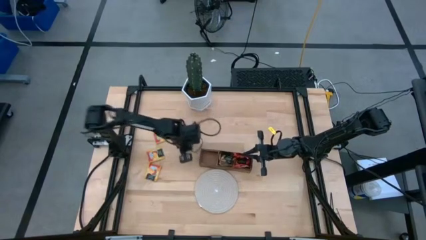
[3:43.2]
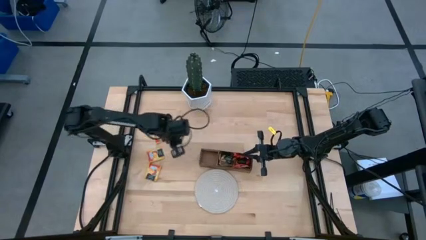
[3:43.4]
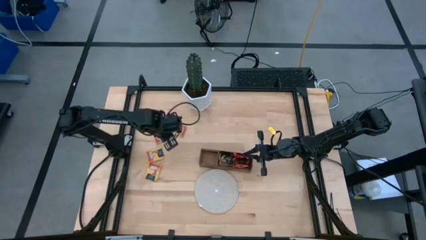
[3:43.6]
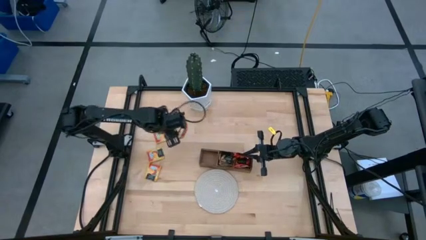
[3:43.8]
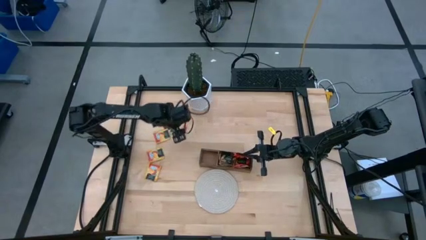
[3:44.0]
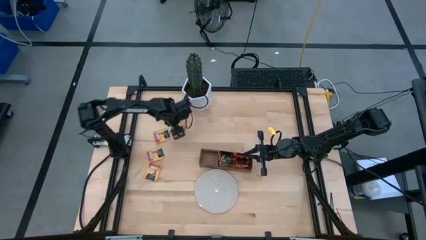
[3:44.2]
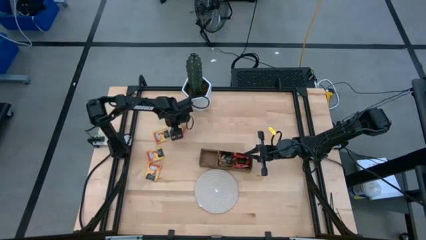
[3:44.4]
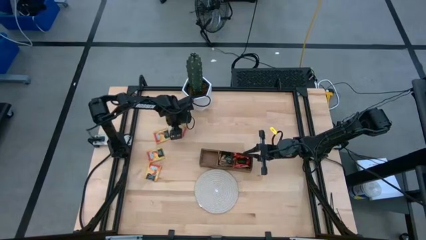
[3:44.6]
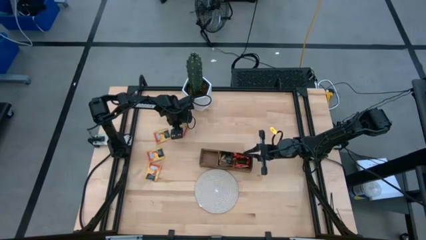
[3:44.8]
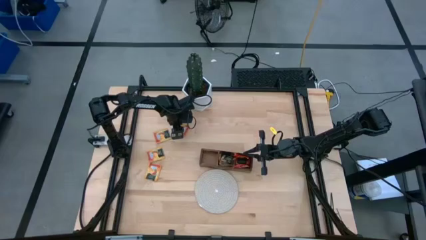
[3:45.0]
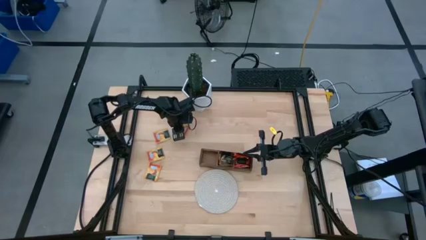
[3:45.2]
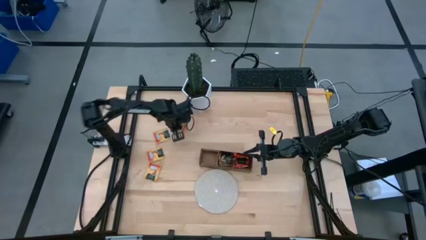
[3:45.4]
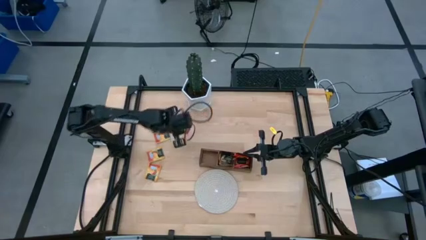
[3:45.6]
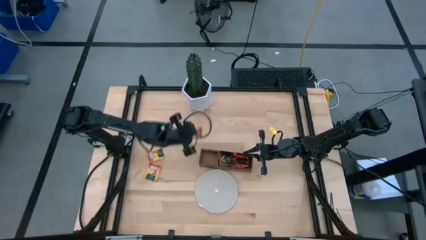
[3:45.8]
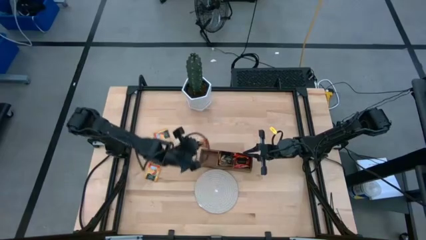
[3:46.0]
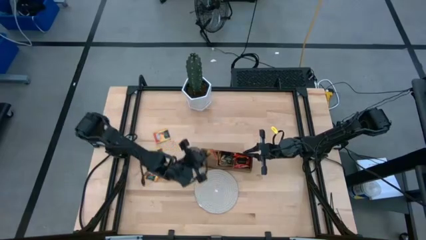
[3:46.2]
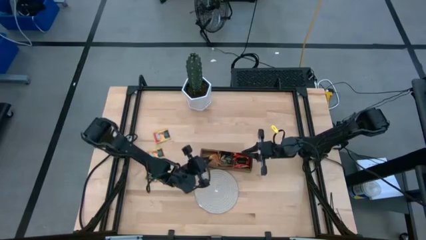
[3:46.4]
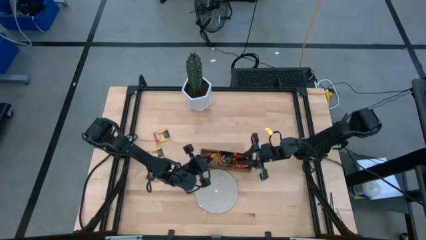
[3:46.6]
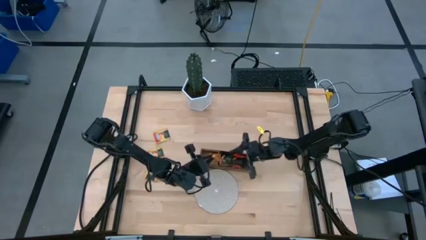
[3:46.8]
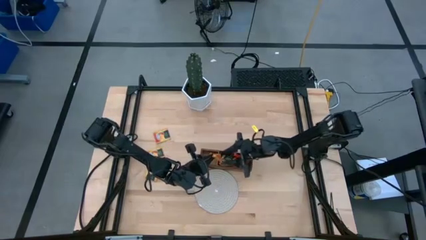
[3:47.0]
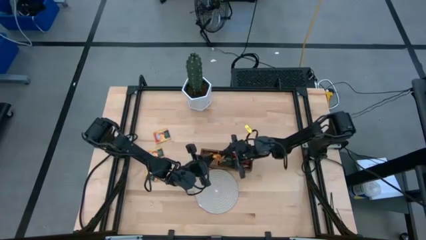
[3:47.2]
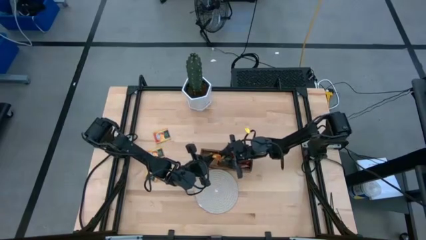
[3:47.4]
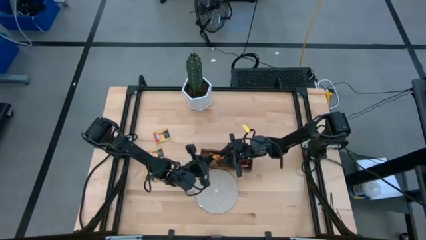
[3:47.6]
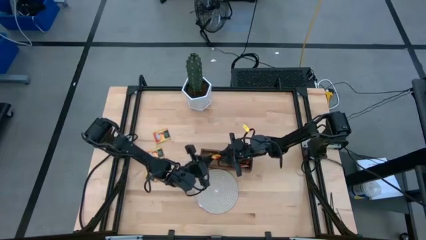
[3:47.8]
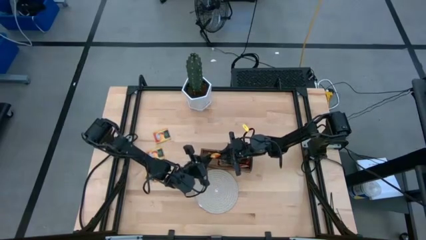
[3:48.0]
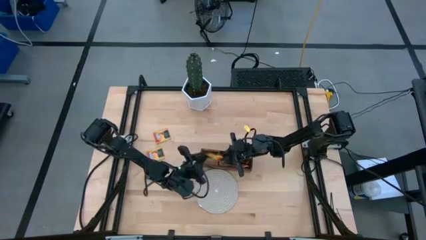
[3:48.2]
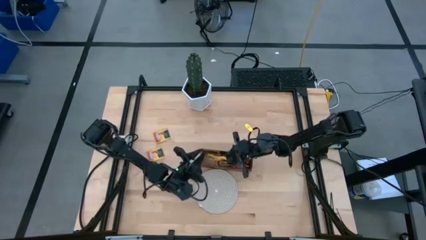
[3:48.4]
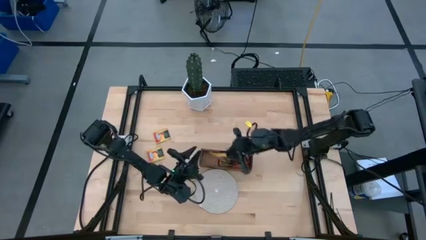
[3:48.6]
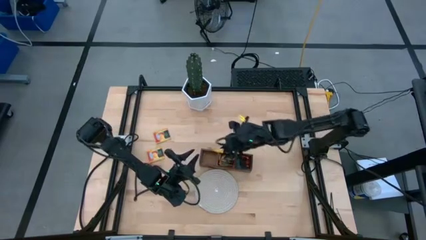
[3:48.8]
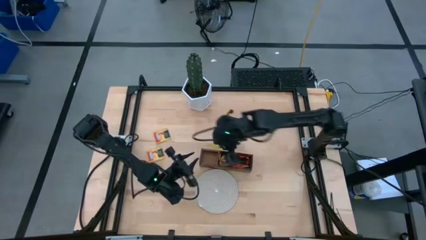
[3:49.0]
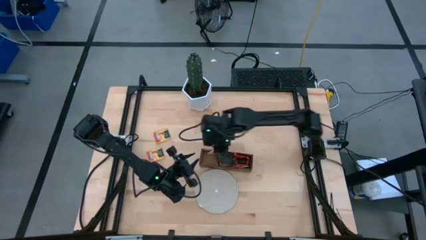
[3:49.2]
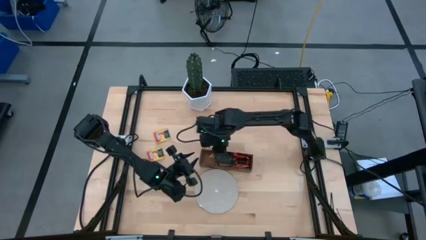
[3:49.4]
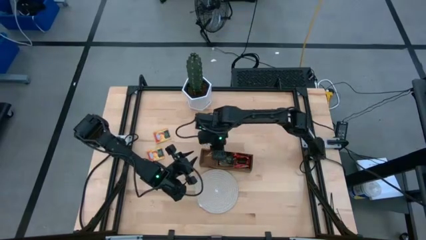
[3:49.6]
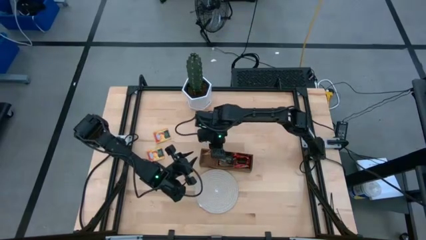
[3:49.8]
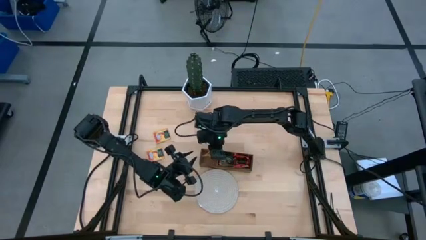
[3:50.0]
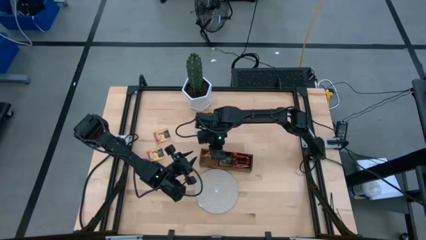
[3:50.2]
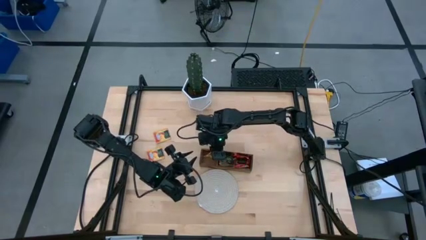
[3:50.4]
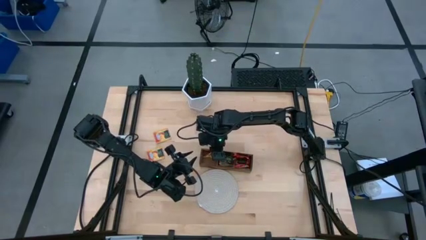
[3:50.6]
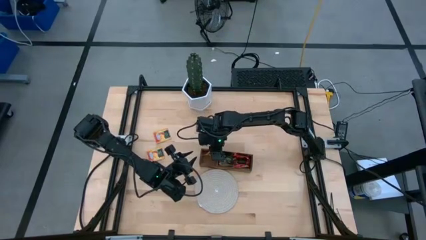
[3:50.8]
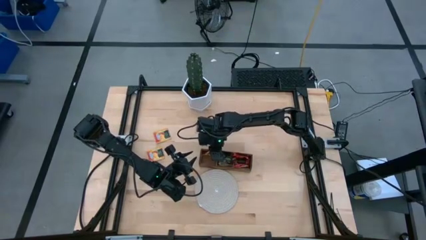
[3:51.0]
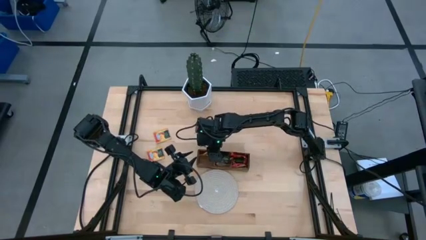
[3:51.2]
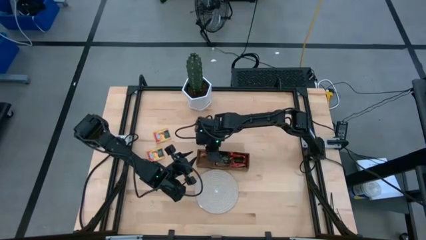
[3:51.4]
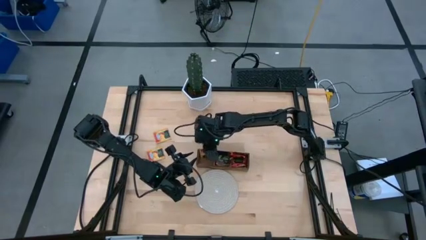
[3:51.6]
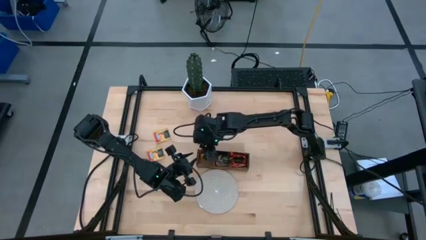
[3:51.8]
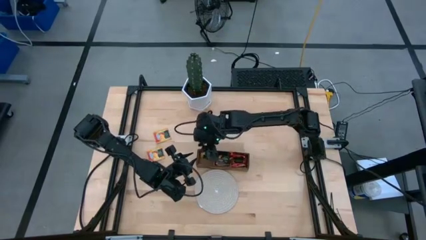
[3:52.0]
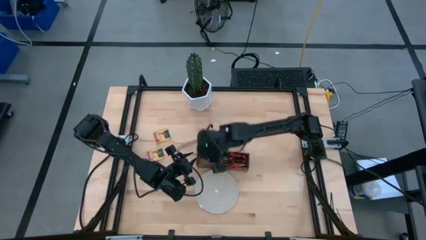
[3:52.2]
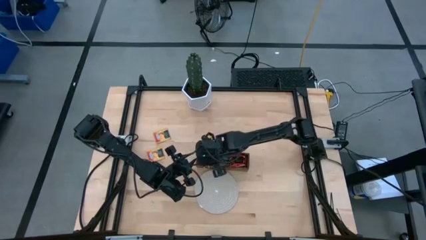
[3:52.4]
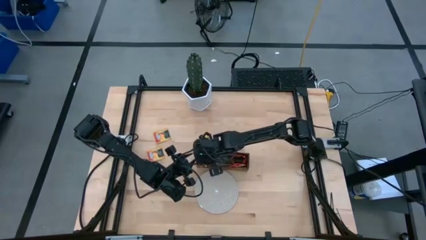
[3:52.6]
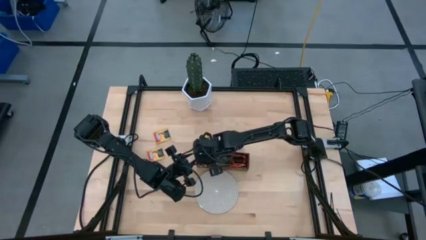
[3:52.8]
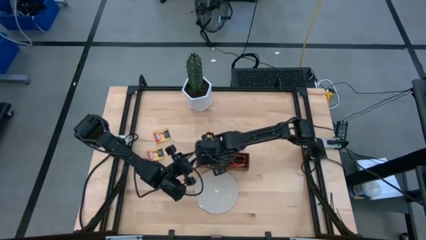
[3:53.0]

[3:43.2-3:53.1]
Task: Pick & Place Tea
Put the yellow tea bag into the left section of the wooden organizer

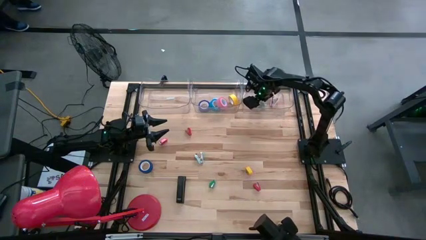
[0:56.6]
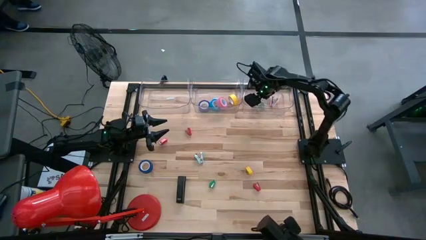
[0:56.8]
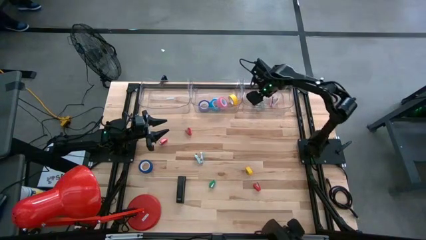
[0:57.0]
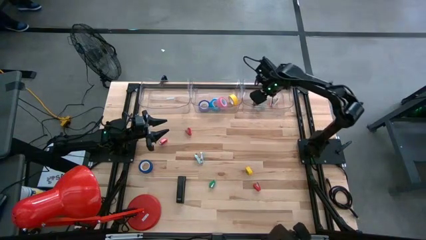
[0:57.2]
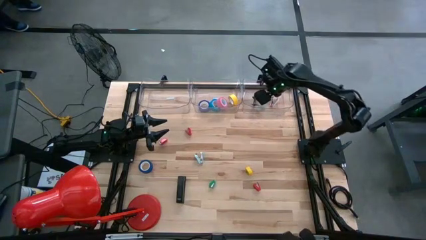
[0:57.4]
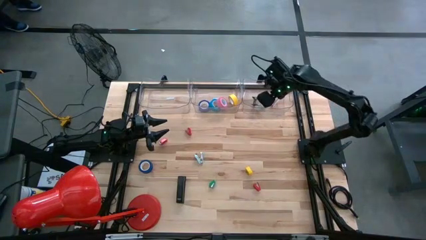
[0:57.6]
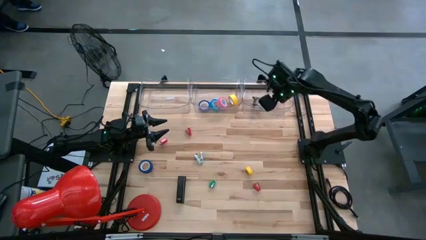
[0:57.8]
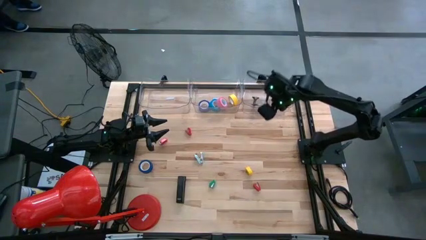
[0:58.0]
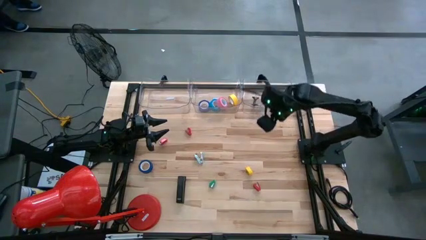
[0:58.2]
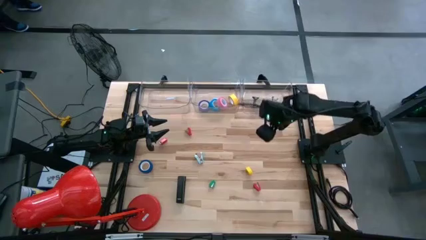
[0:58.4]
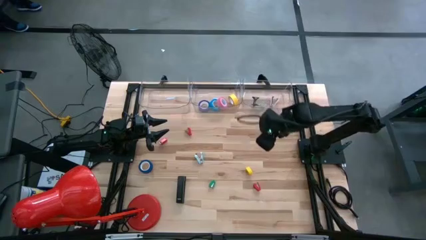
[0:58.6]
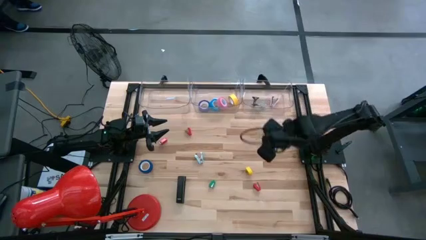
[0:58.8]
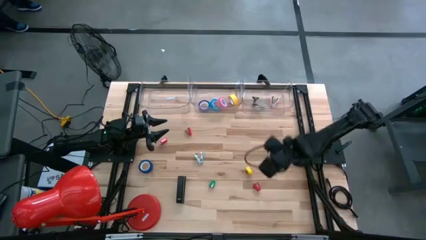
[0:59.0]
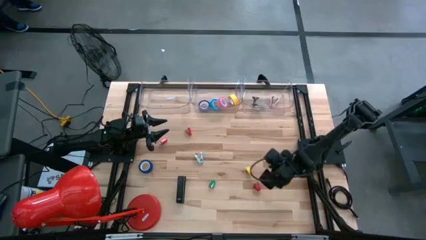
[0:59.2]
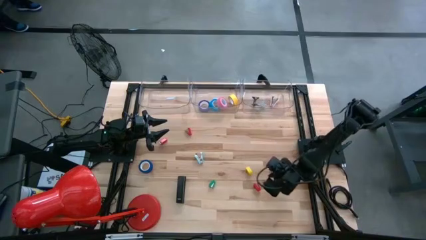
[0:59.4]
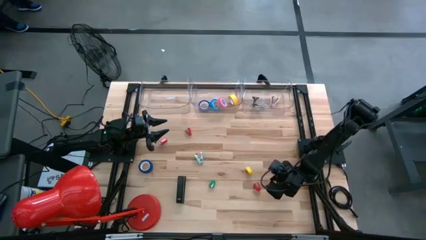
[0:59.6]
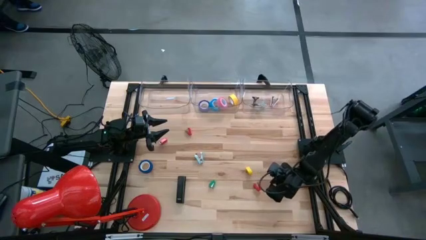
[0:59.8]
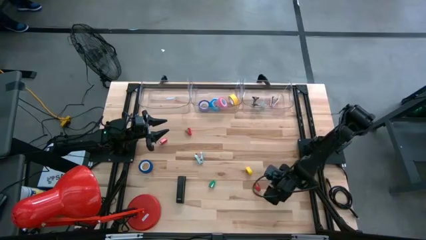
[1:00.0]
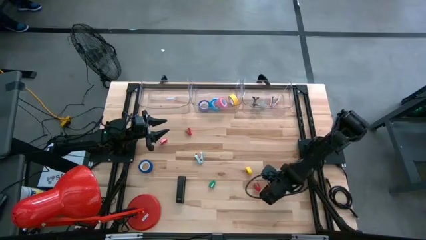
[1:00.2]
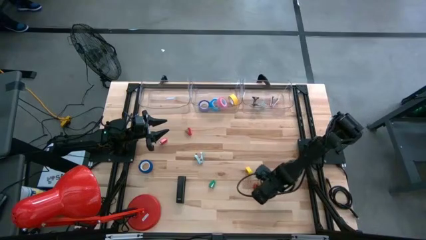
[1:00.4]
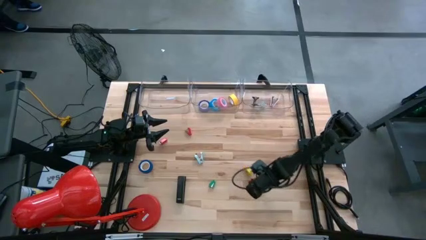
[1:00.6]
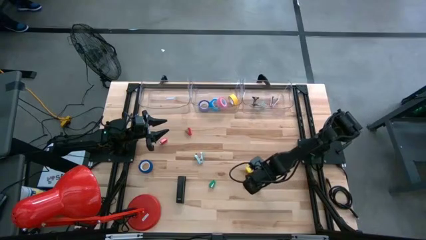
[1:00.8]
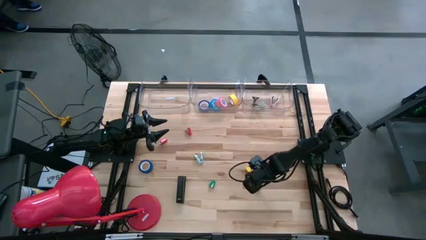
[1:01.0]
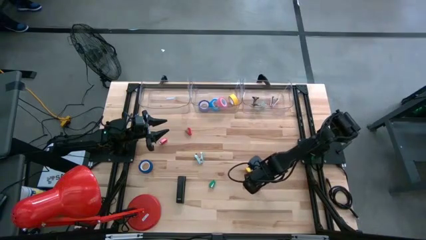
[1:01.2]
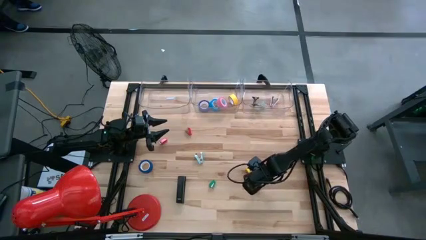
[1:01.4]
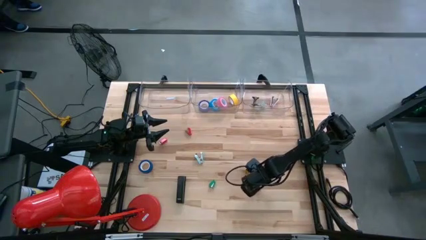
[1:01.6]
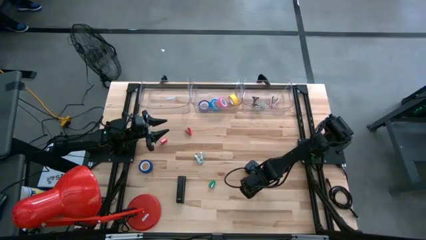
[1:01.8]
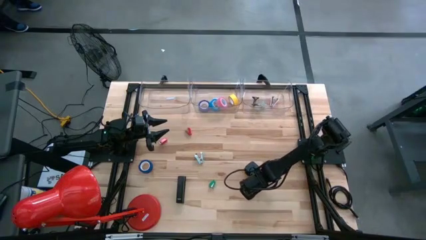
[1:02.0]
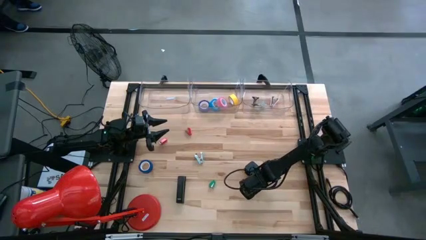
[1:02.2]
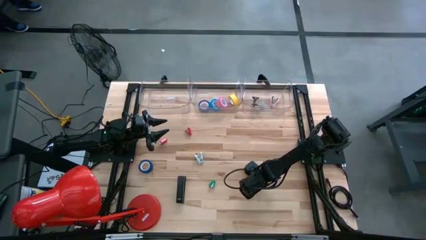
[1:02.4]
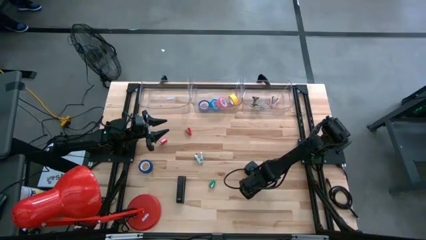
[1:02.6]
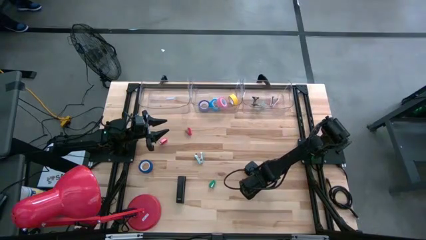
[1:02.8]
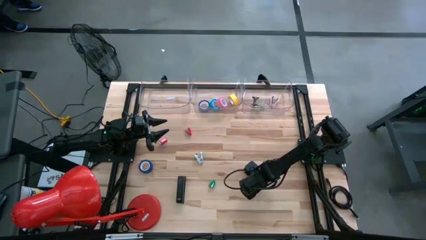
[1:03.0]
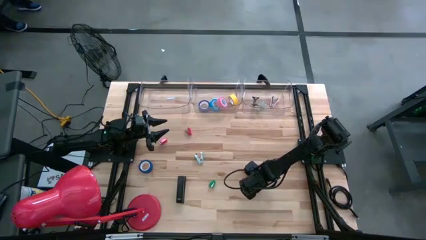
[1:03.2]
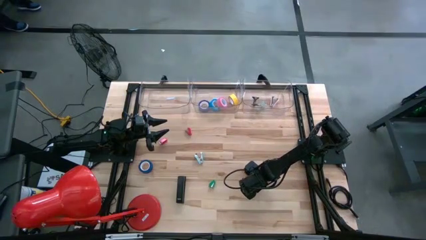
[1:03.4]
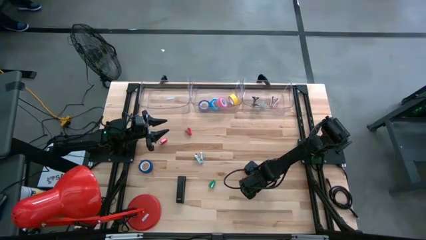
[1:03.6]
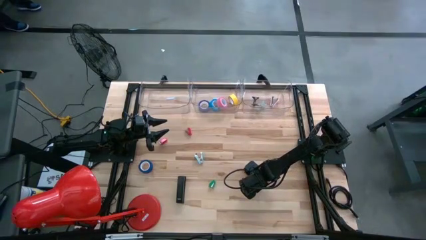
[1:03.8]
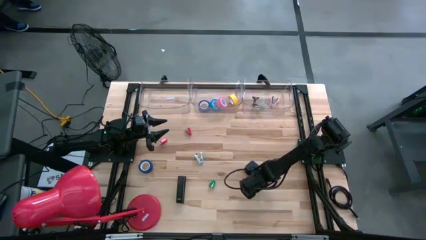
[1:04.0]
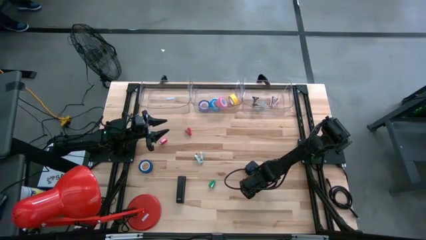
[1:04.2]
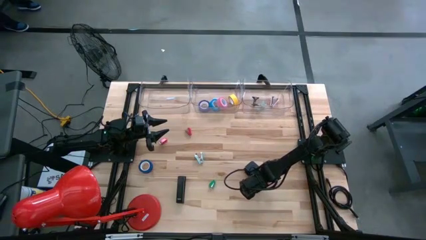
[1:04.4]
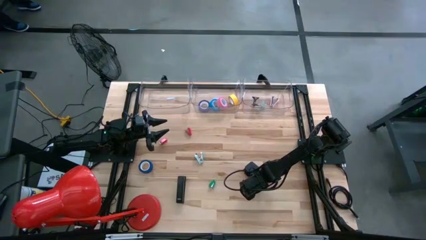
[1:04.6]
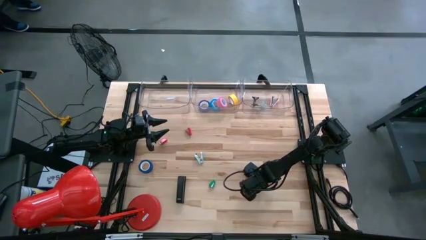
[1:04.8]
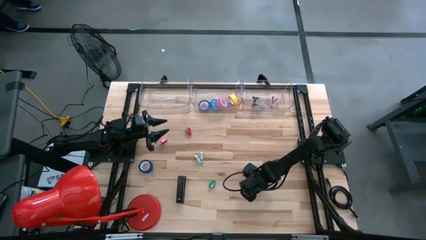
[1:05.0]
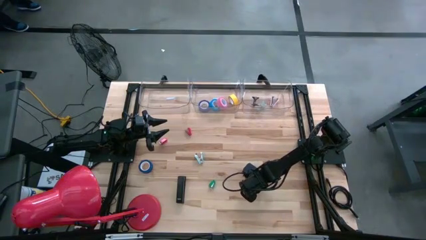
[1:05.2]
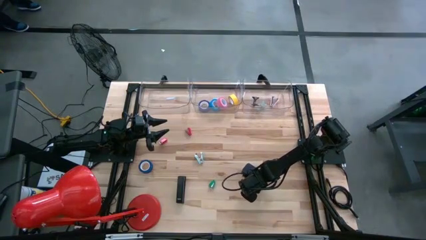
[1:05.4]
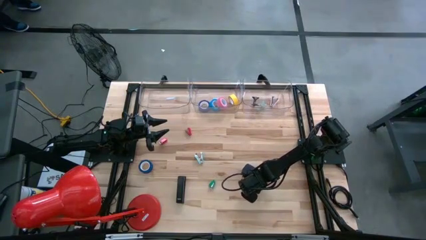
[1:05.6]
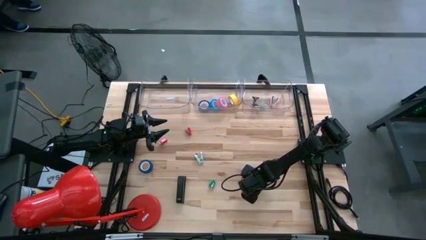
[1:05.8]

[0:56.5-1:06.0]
Task: Pick and place Stapler, Stapler remover, tape
Put the bottom right red stapler into the left transparent bin
